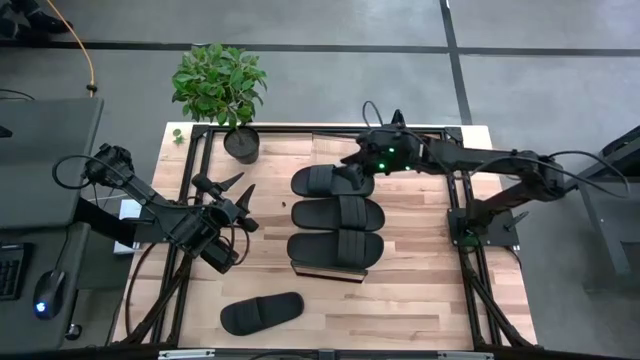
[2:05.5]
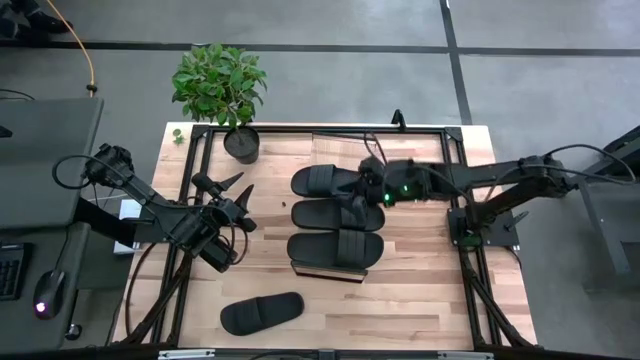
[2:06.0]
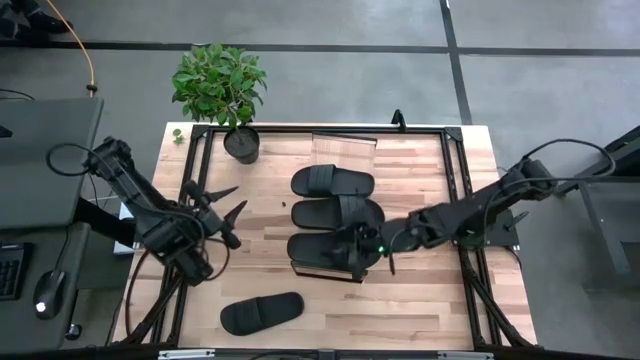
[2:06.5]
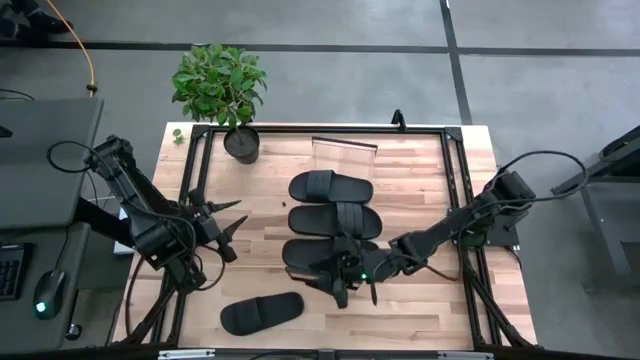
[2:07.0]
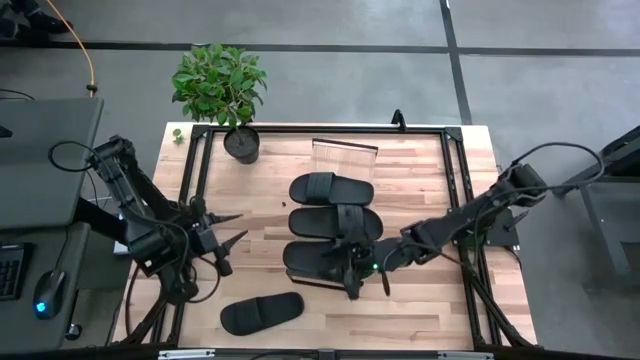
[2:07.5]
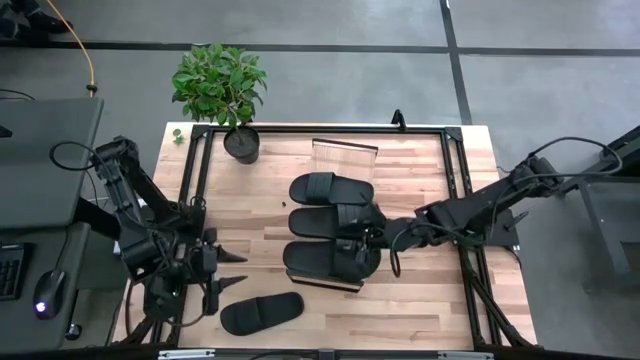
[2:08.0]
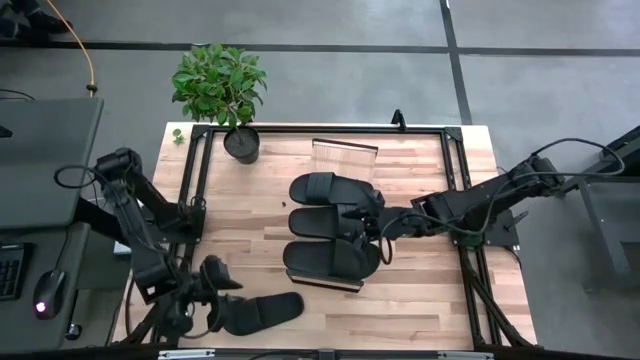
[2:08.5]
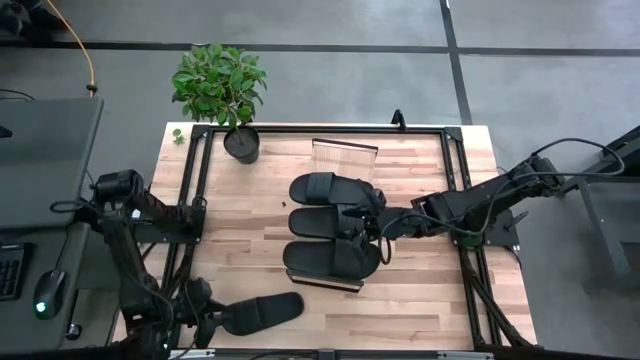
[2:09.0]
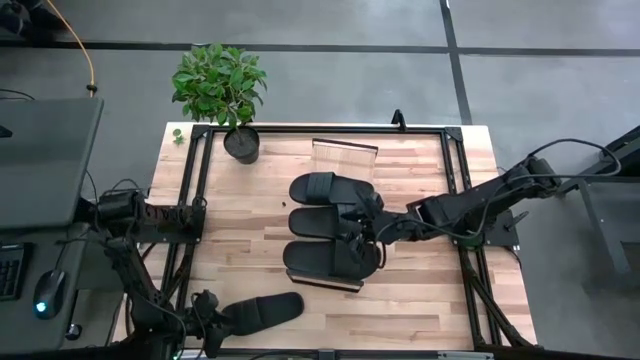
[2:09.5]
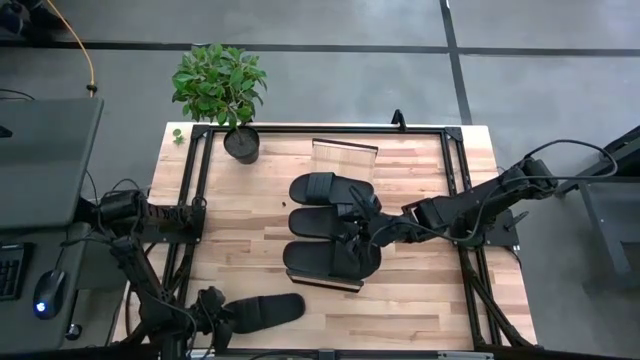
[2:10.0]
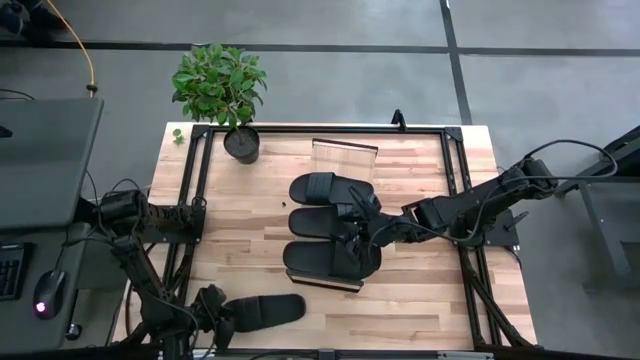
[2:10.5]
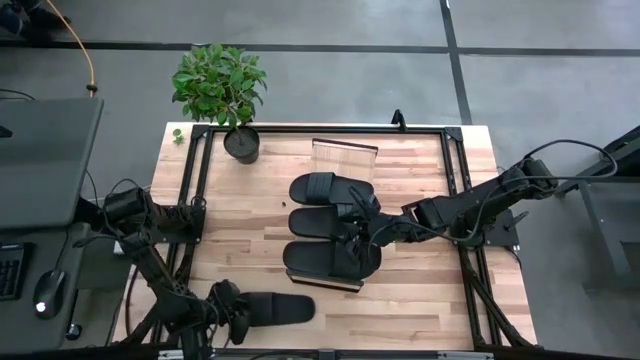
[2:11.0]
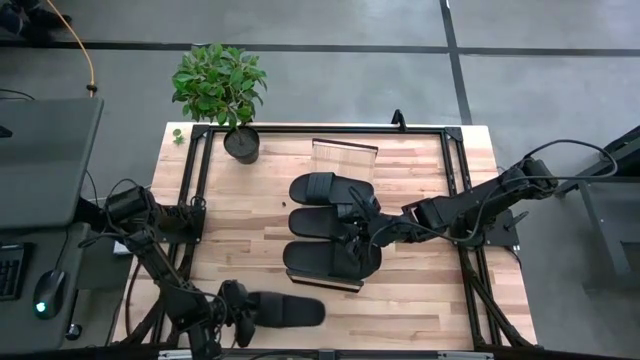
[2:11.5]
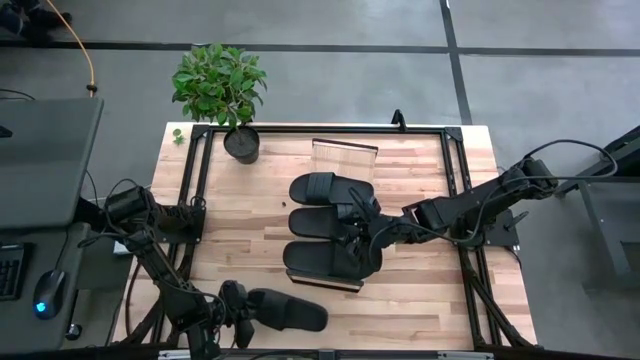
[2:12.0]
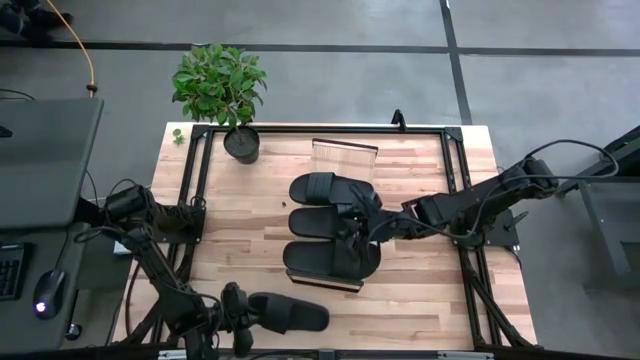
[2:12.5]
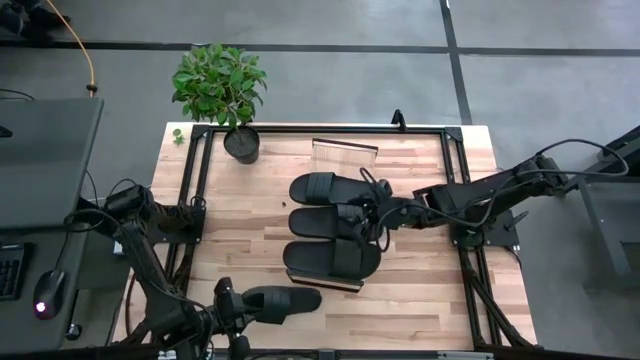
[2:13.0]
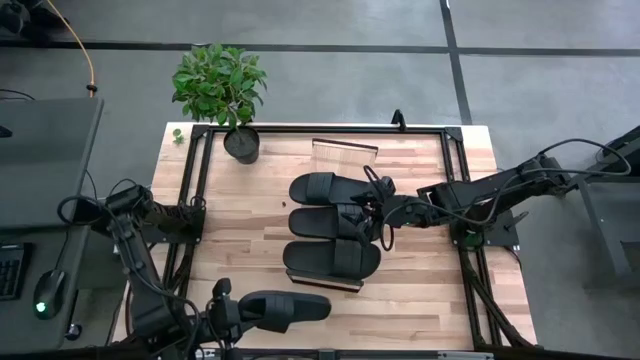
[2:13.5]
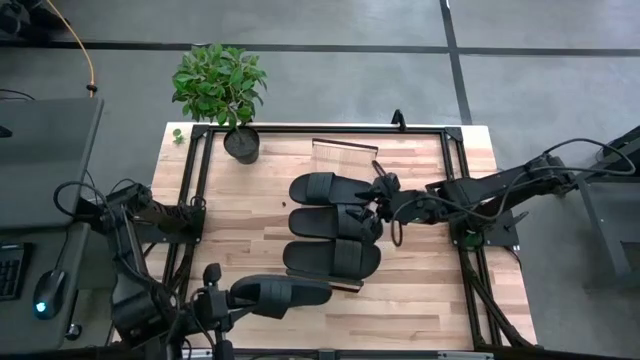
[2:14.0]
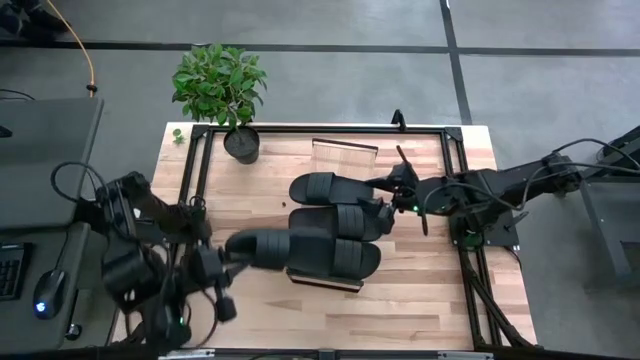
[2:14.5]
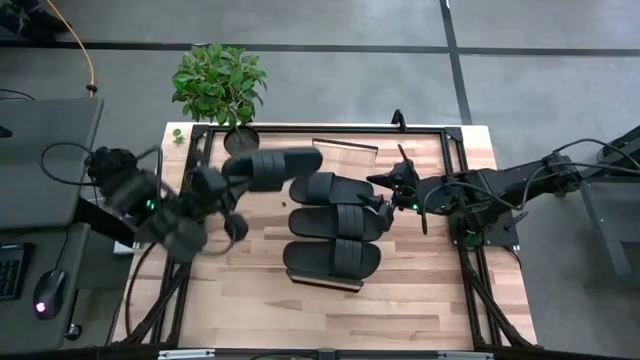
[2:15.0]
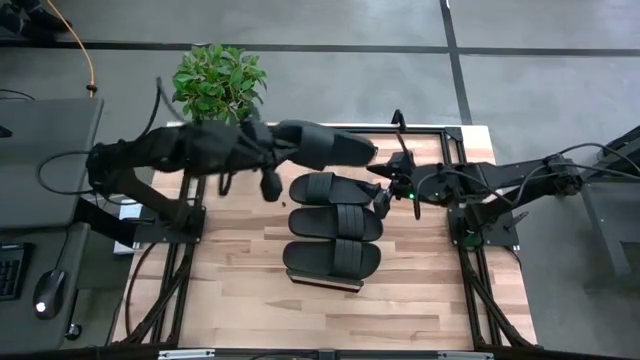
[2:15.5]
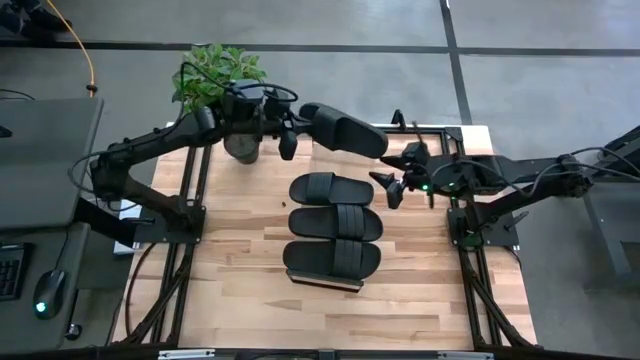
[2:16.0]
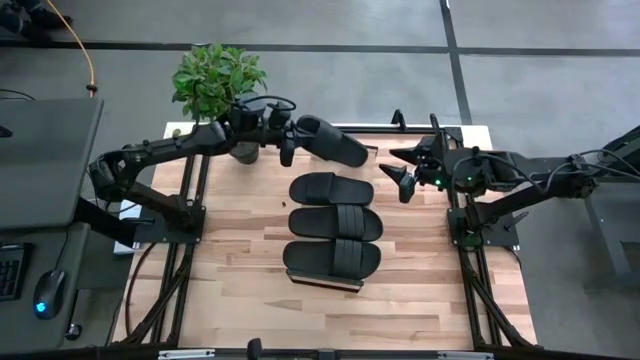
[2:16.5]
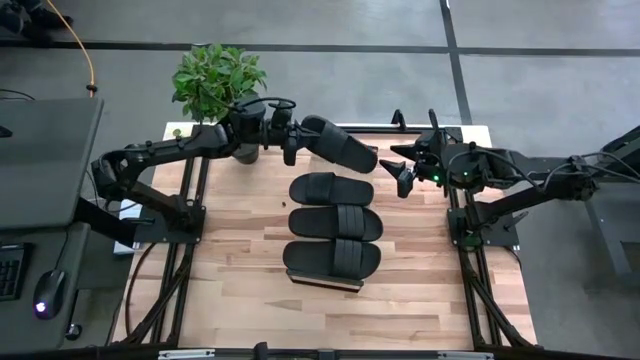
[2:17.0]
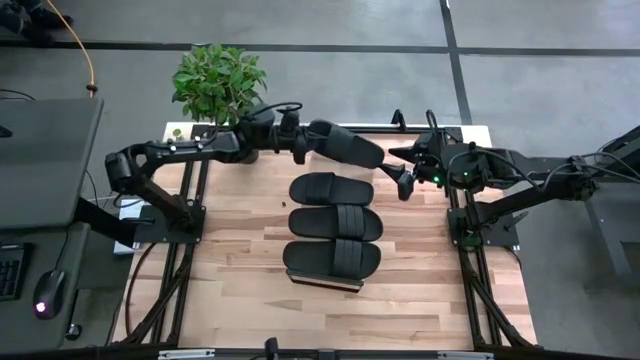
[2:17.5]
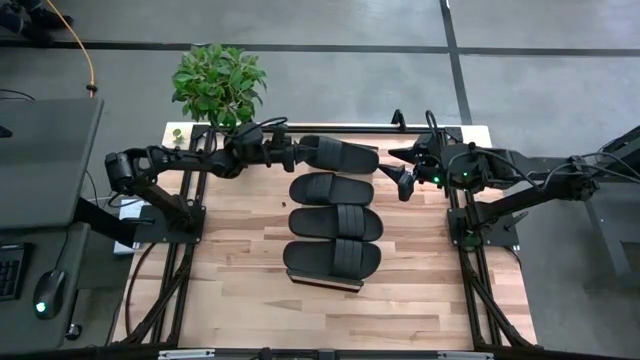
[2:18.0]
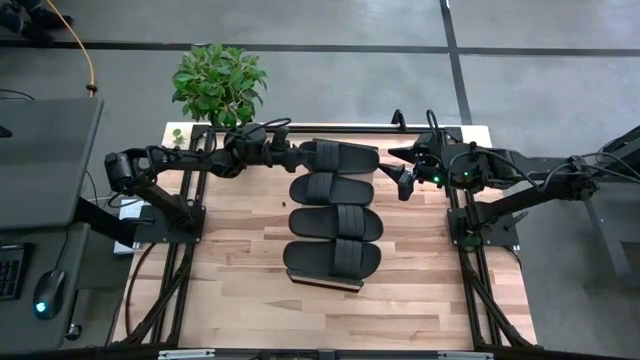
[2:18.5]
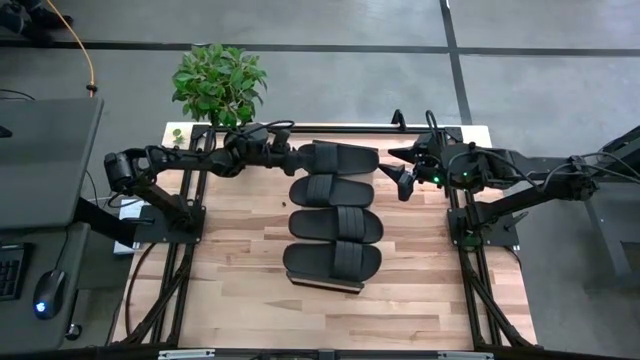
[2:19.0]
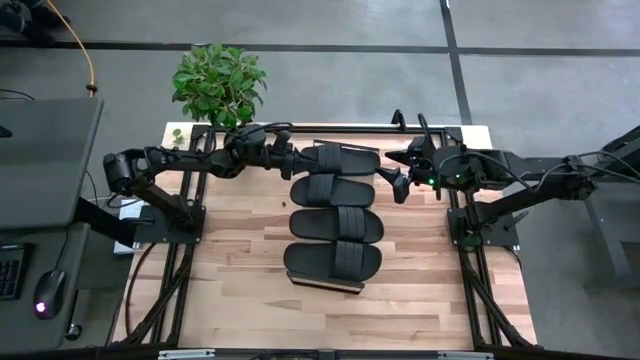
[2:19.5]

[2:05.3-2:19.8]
Task: Pick and place slides into the shelf
Put the black slide on the shelf

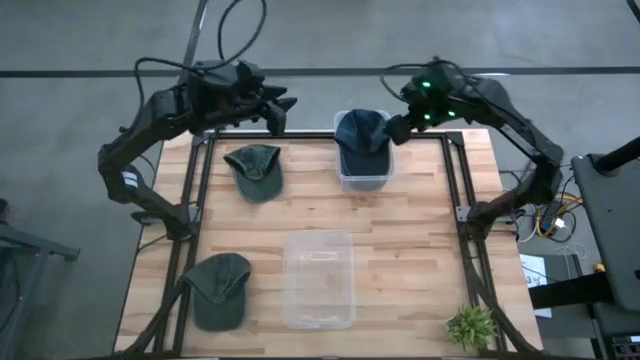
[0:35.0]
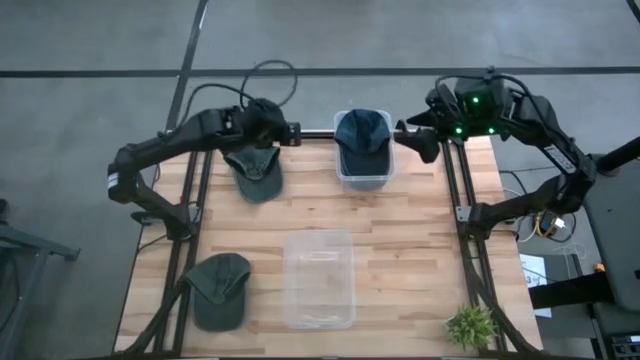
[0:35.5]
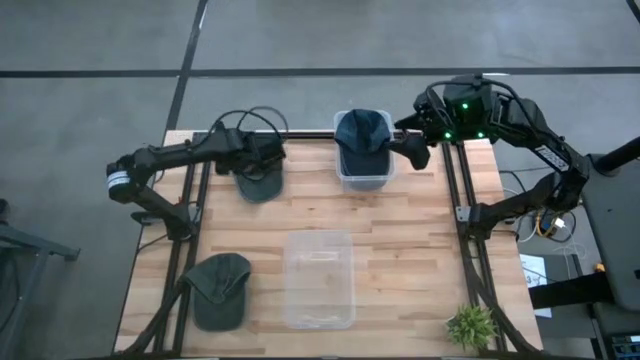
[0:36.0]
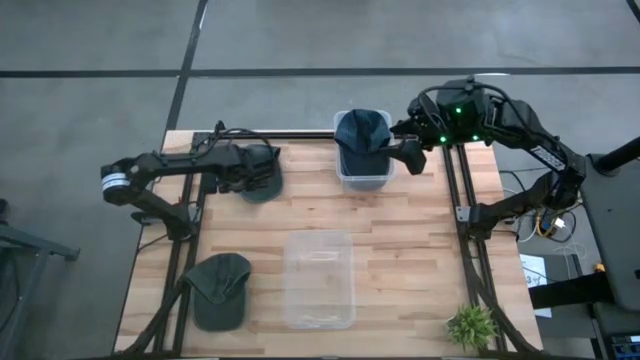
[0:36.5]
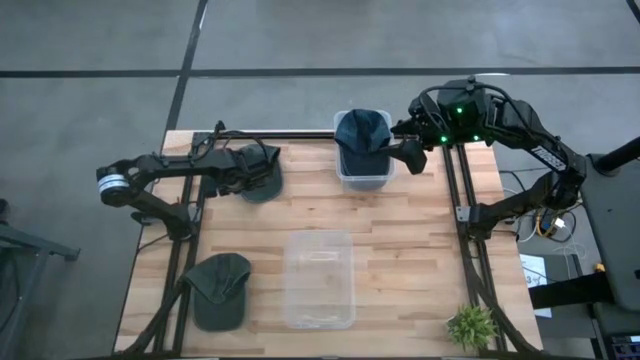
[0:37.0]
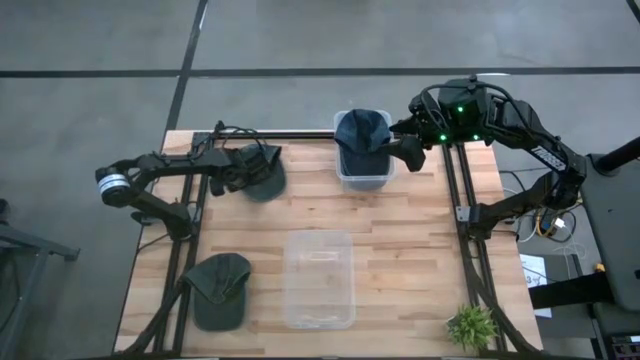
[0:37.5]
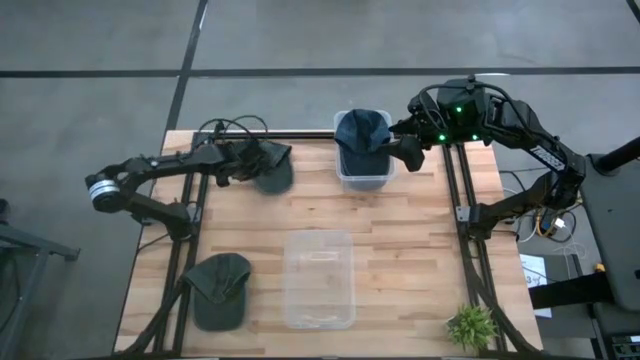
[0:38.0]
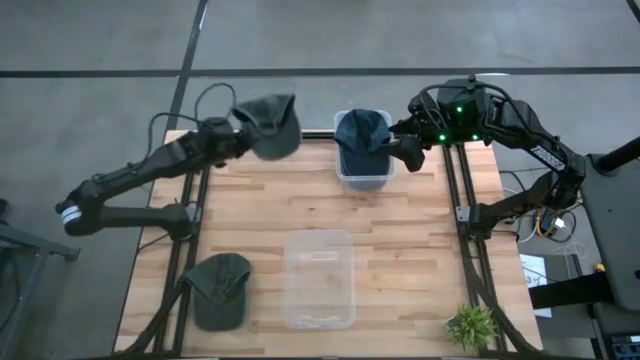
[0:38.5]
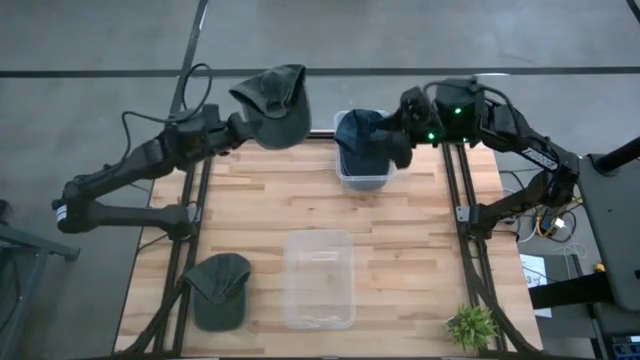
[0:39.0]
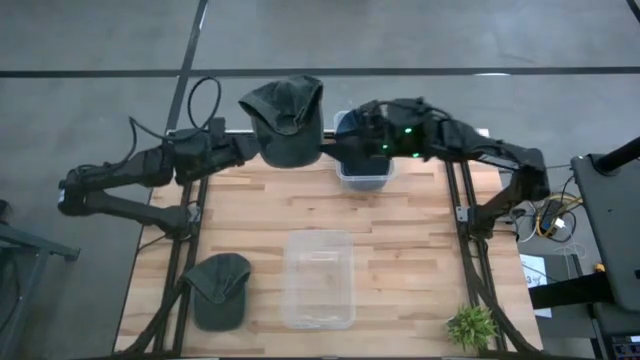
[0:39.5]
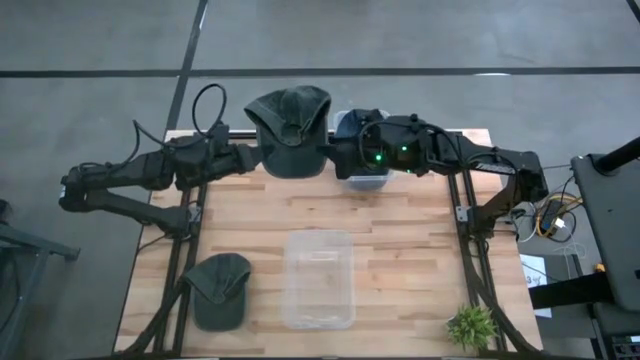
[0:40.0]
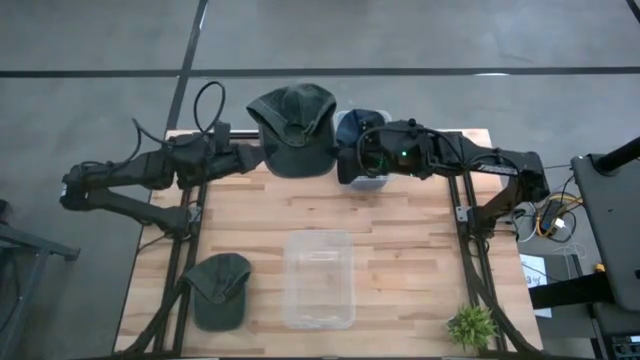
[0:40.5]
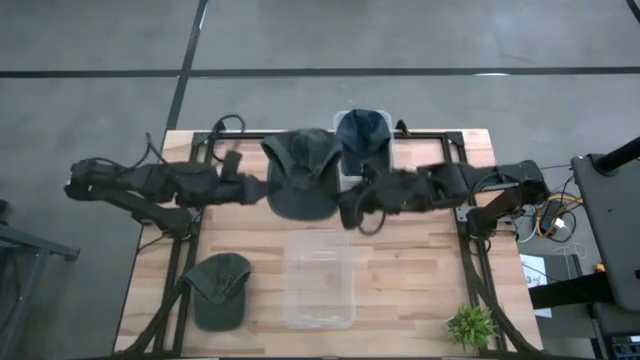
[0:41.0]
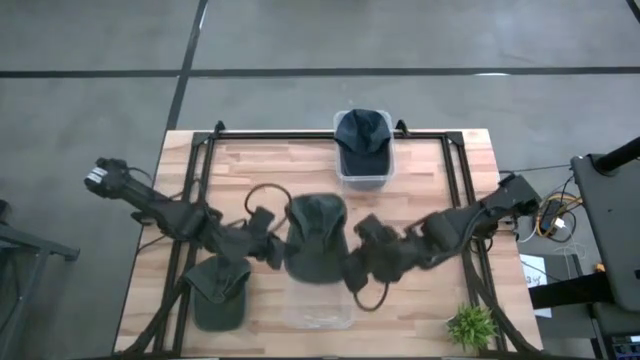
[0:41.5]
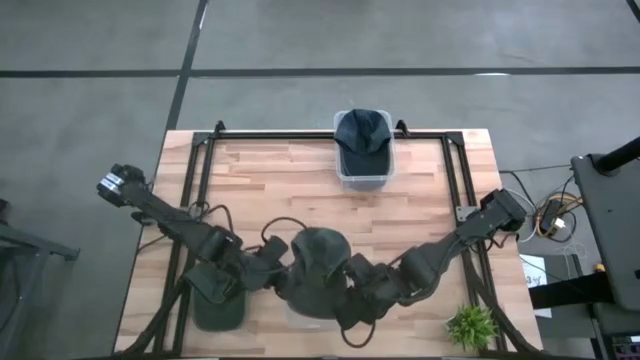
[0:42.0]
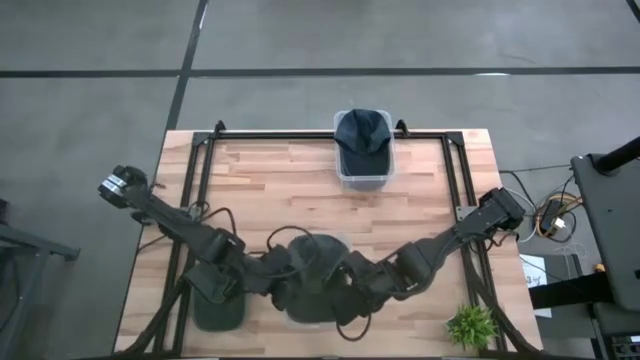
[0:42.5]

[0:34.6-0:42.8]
Task: Pick & Place hat
Put the top gray cap into the bottom transparent bin
